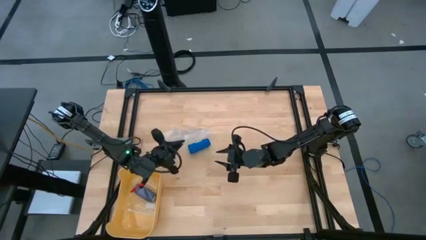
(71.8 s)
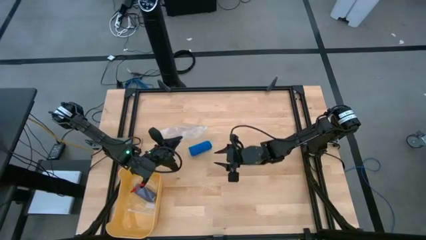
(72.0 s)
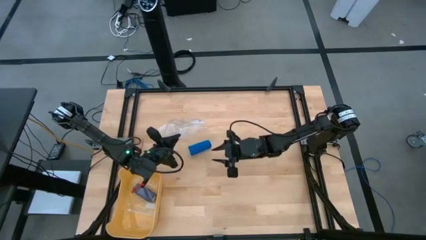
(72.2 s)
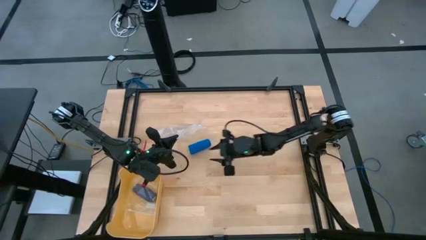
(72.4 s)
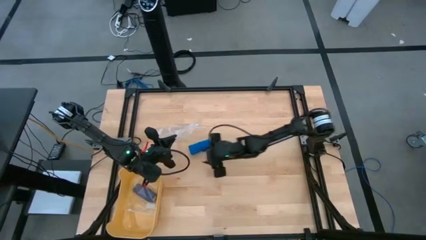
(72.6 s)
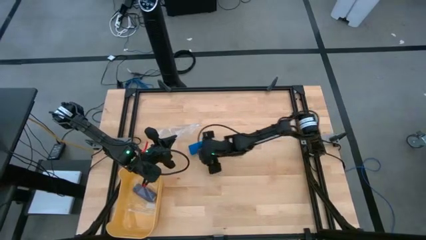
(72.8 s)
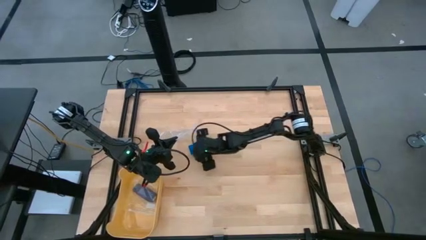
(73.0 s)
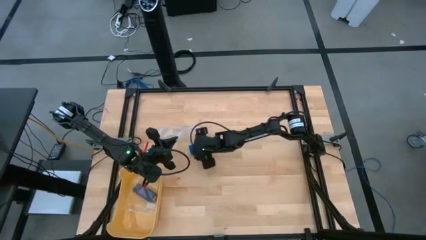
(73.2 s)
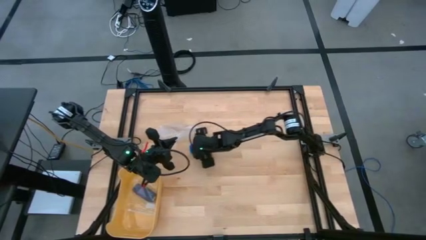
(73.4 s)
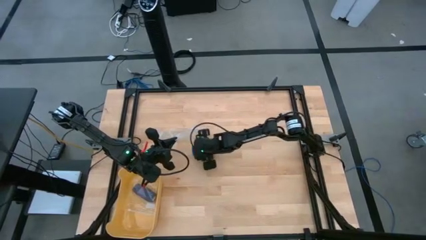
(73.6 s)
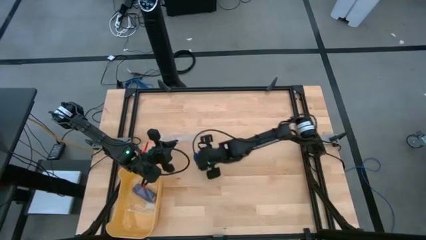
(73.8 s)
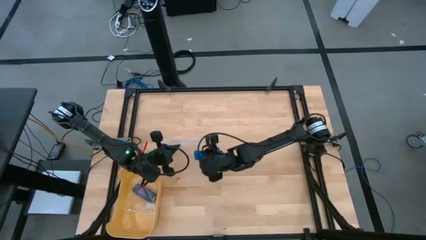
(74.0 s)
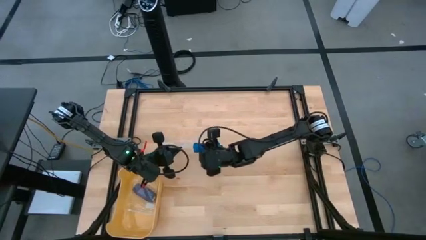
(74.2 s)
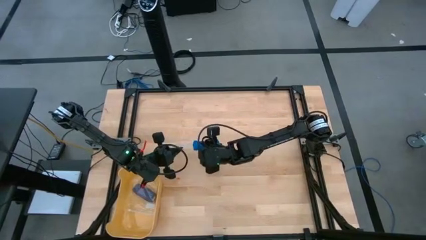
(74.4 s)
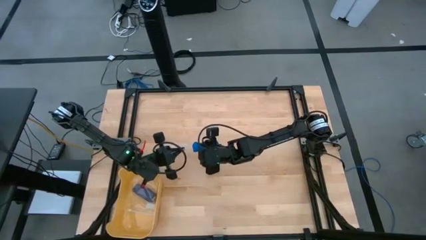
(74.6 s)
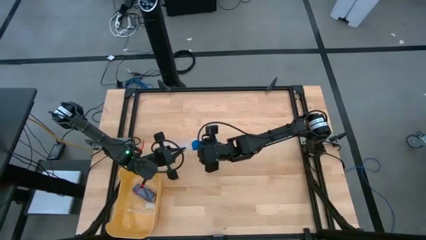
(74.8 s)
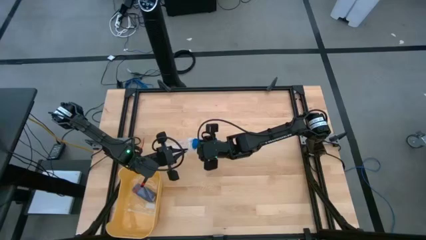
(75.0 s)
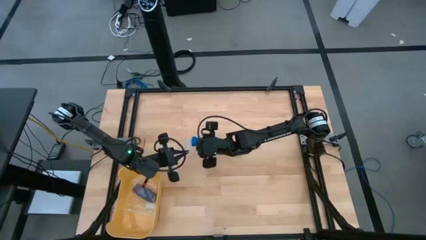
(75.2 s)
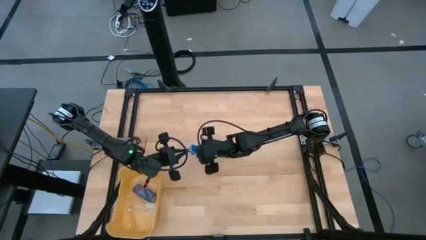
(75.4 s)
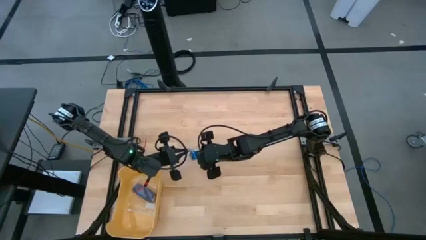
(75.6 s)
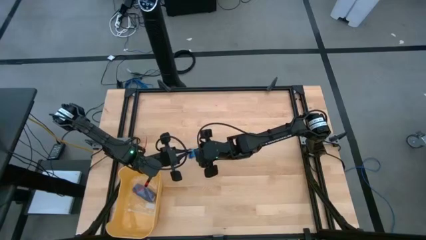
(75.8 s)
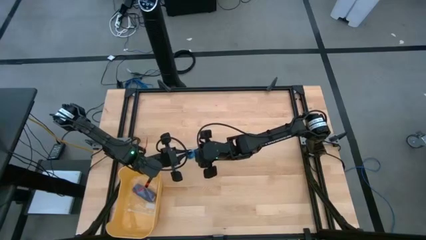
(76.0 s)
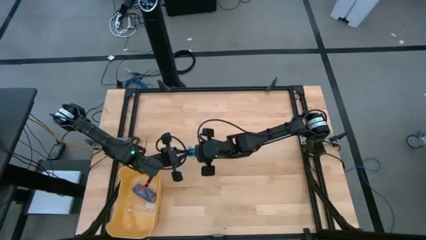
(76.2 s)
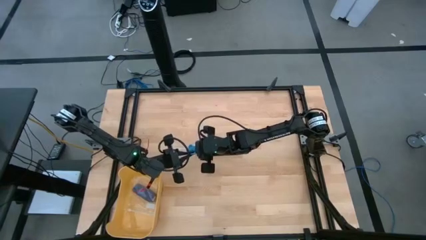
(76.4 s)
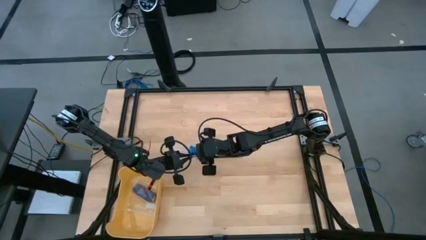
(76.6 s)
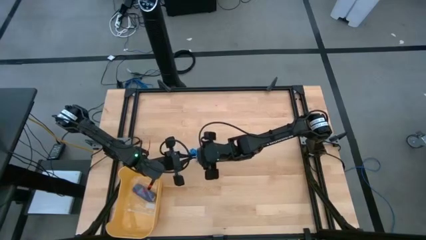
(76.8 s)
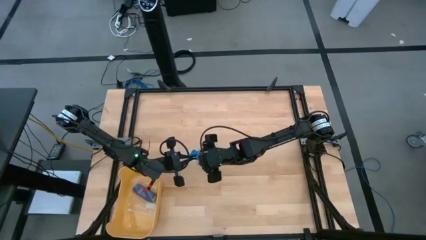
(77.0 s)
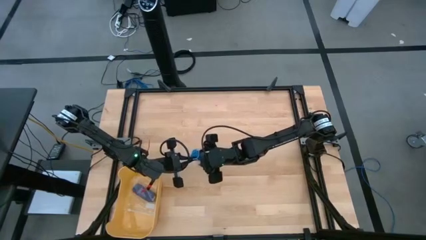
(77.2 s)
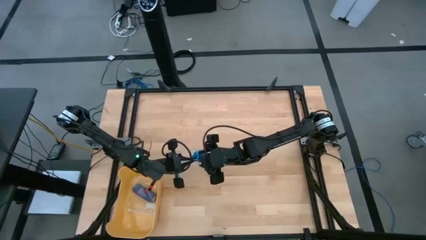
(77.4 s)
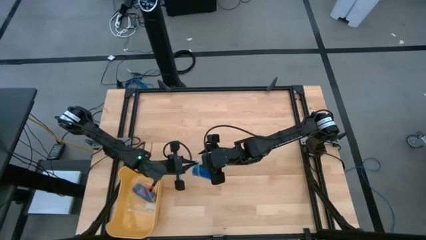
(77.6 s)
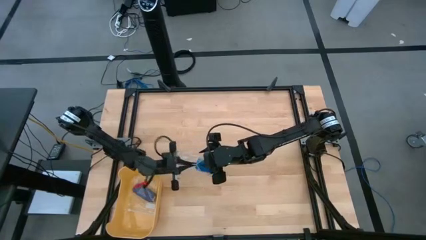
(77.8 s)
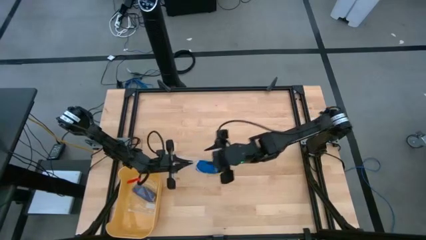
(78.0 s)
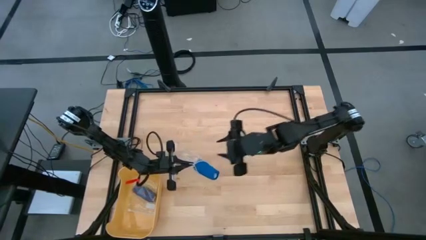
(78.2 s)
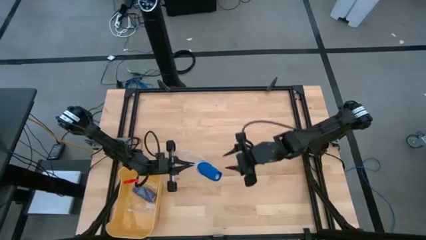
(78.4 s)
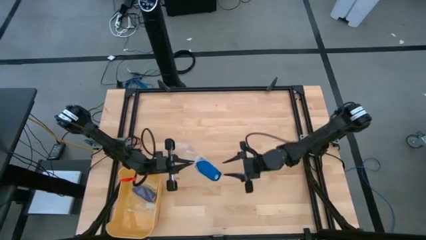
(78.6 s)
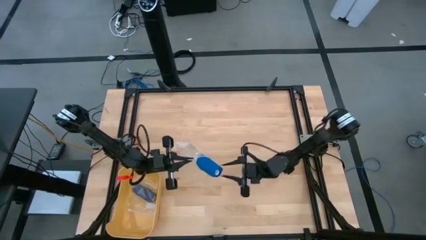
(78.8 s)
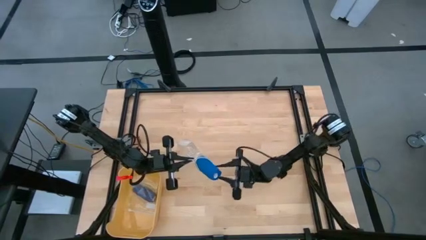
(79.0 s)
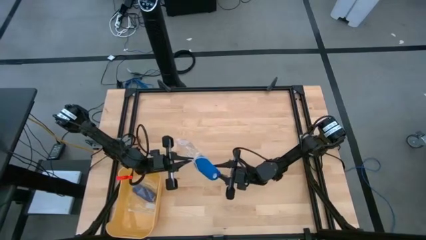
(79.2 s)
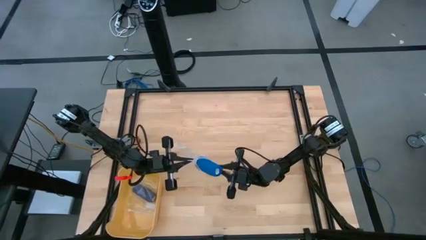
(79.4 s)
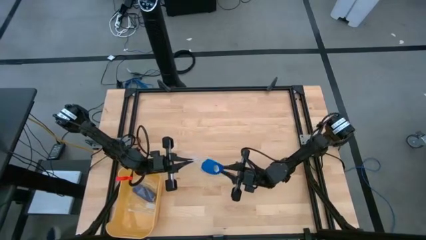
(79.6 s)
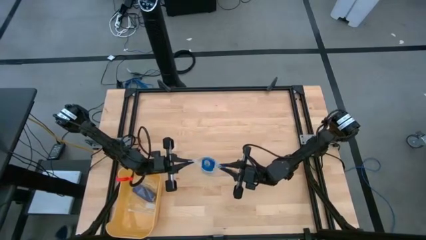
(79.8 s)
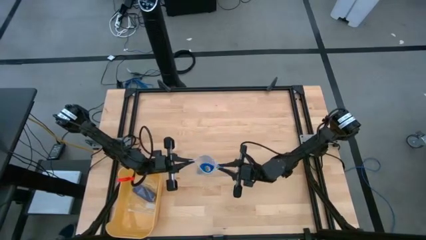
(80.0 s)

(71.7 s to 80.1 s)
Task: Roll bandage
Put the rolled blue bandage into the transparent zip bag

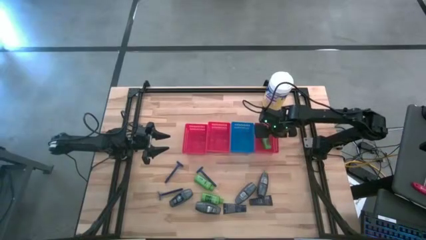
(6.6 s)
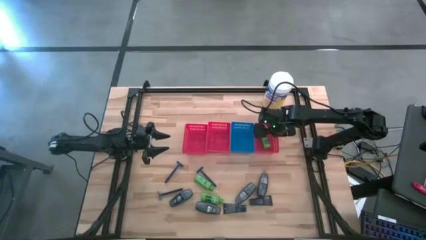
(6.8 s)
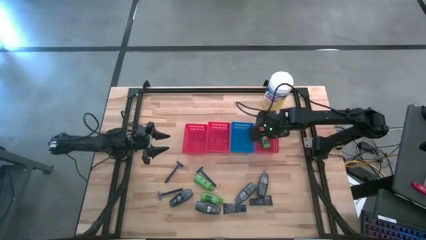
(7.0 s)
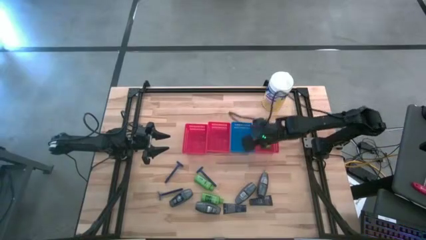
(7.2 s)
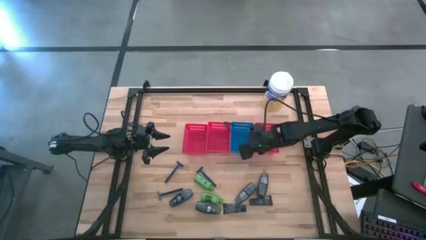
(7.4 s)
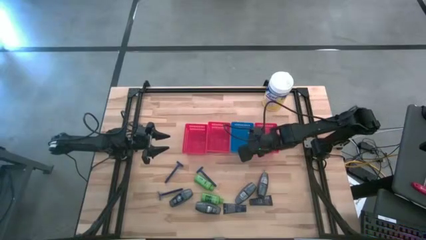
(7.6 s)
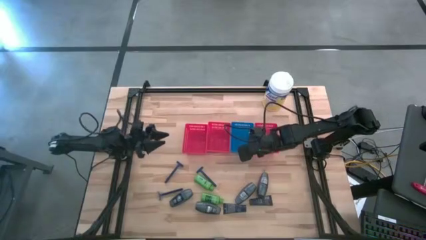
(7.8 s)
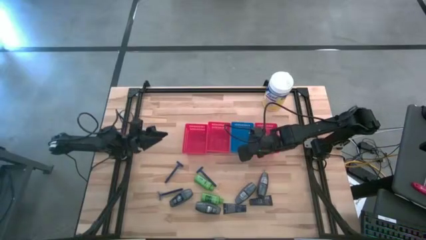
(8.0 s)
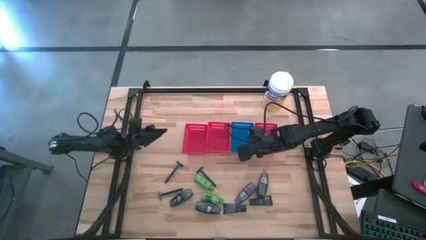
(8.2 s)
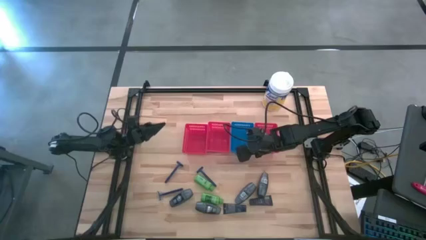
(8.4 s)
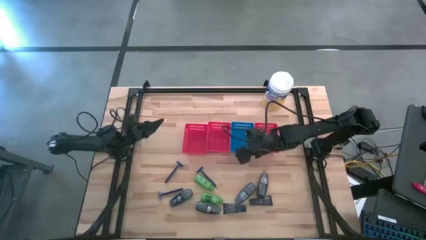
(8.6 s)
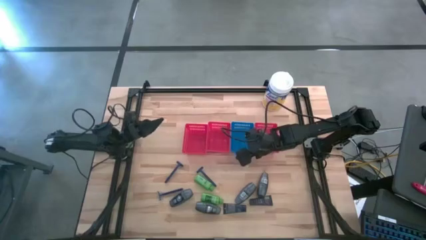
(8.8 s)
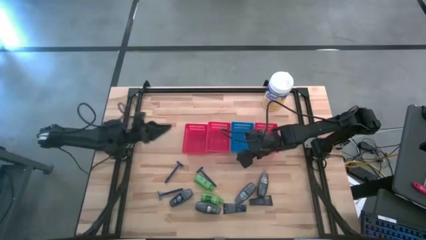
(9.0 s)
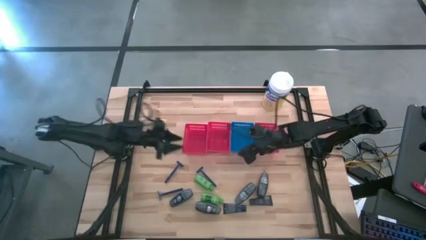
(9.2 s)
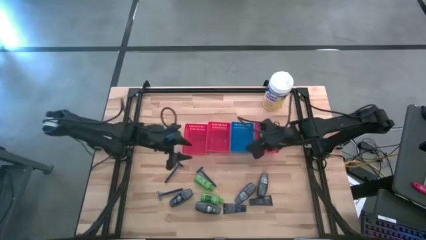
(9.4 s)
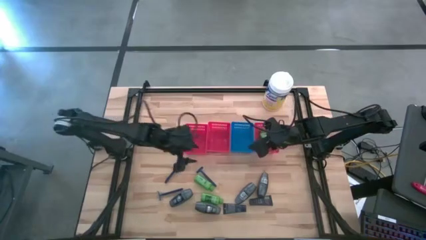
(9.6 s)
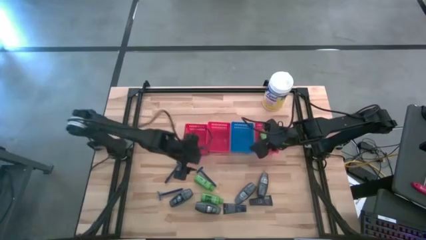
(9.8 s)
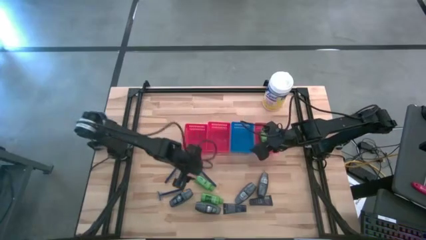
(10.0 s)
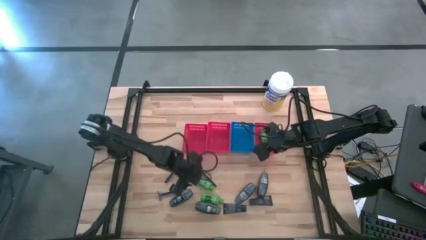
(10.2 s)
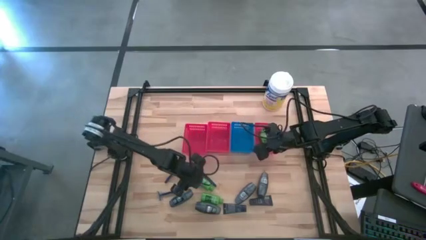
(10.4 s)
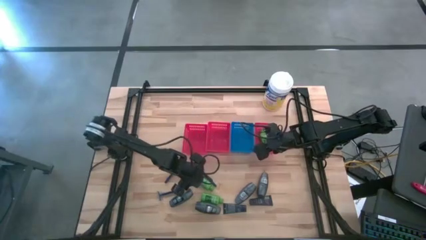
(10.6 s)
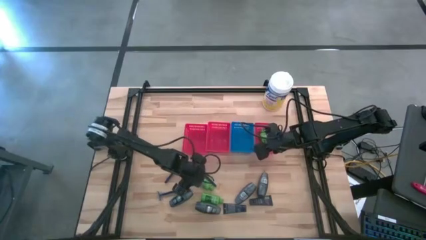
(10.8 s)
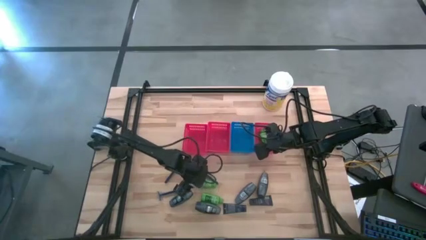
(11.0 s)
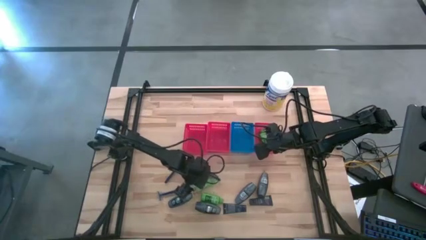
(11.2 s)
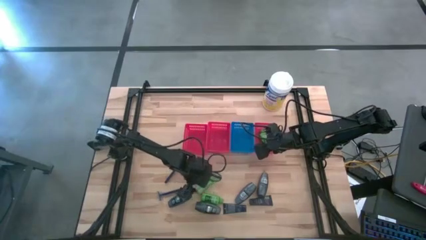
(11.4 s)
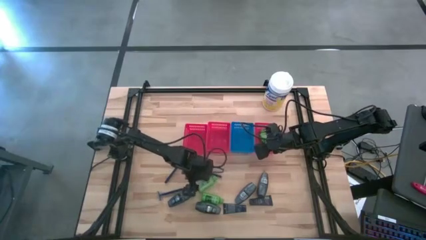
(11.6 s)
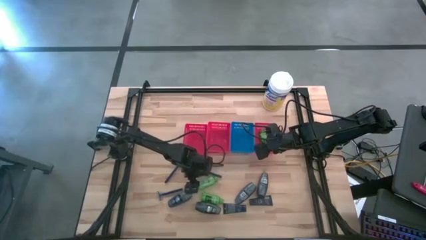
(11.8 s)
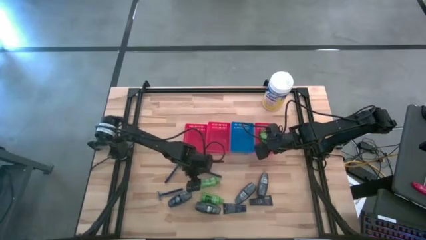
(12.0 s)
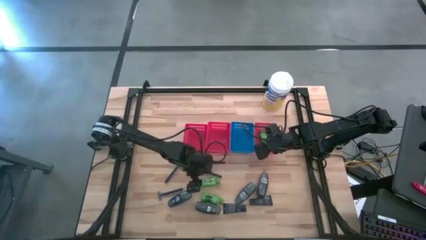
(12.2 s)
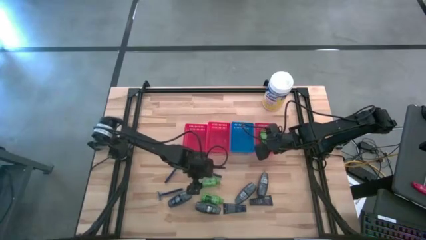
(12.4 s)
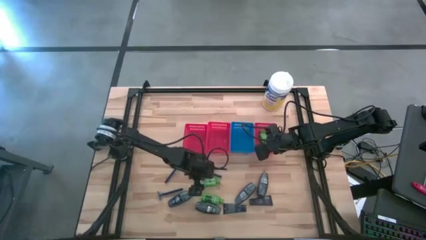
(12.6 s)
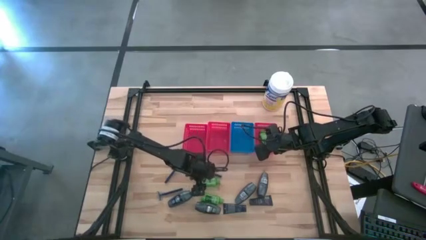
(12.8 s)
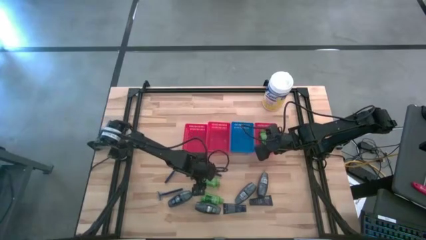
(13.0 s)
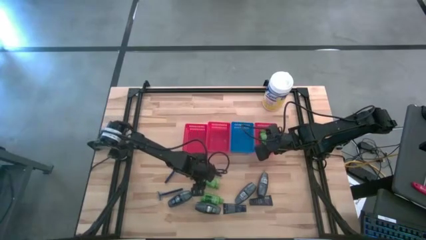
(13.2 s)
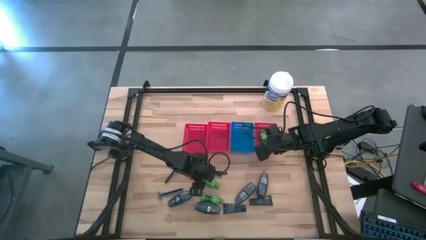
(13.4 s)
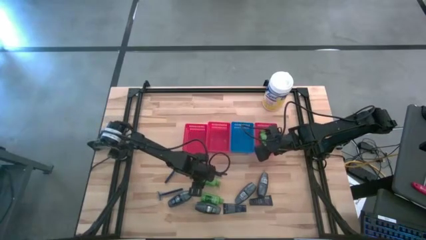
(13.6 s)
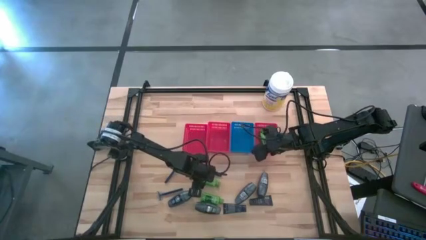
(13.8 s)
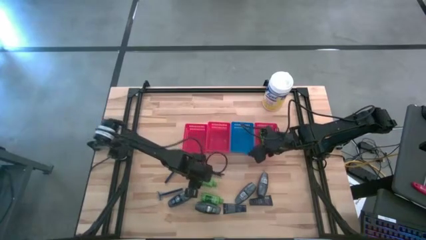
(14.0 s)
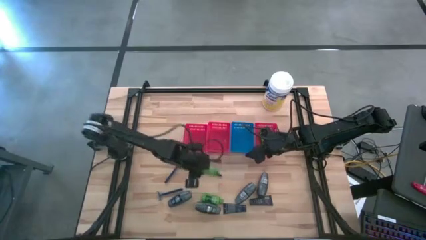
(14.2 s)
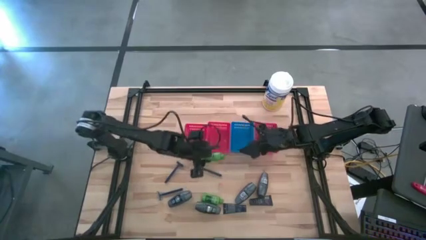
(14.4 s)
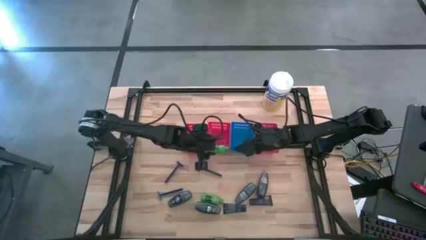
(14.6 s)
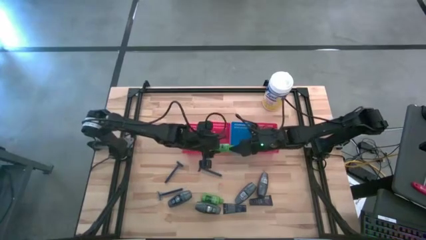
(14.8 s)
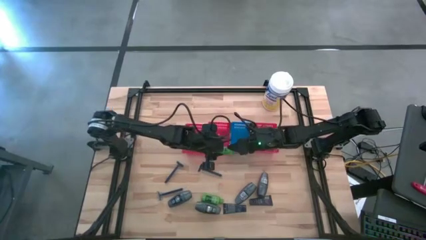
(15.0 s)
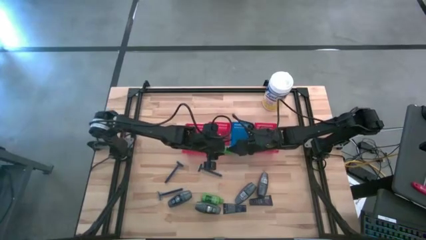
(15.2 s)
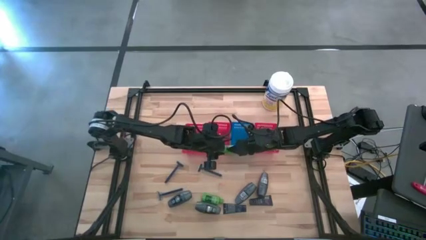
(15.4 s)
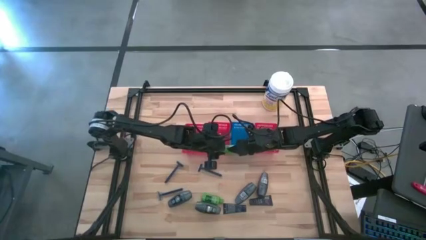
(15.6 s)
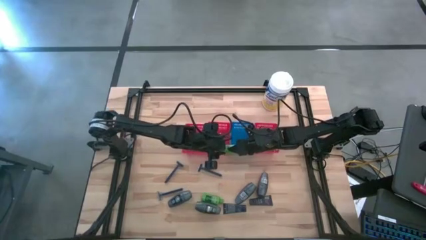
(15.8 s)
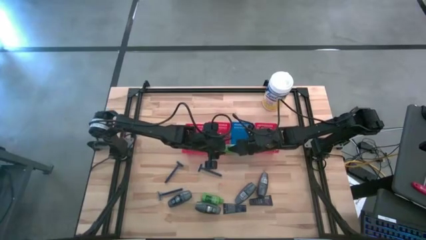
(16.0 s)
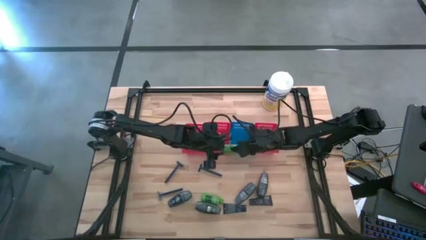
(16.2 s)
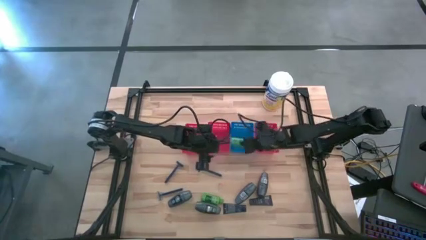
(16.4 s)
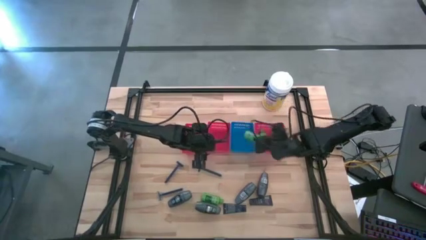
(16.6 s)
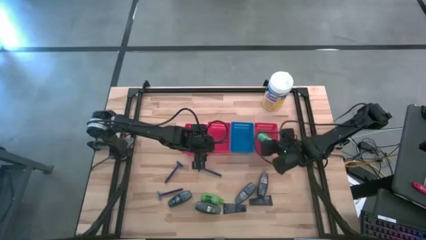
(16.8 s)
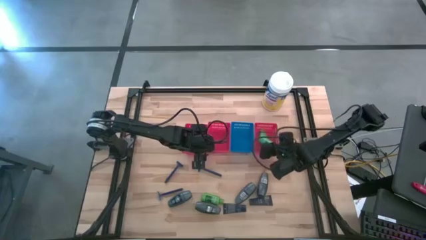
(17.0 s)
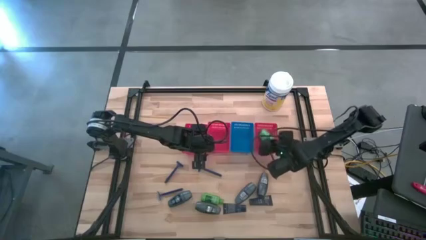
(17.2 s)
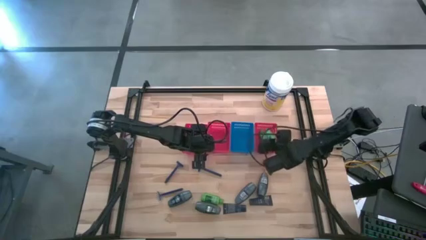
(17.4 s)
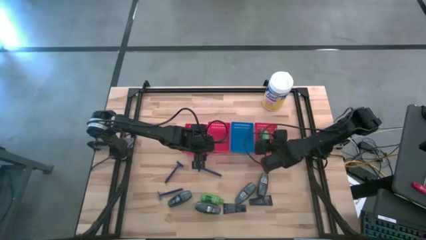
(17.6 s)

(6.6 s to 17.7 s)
Task: Pick & Place Travel size toiletries
Put the green shampoo into the right red bin
